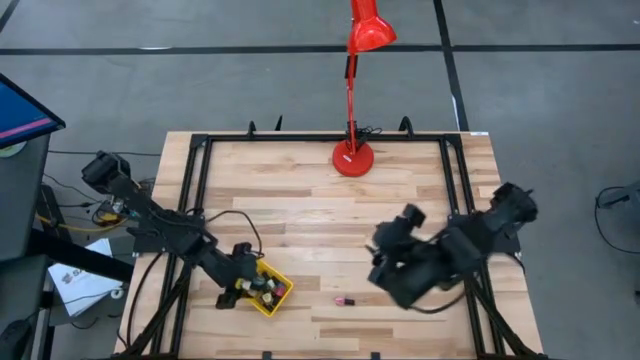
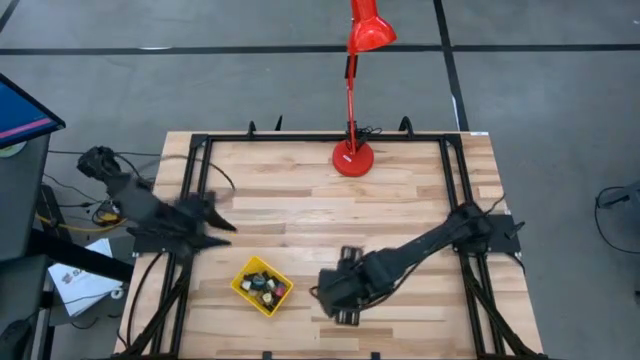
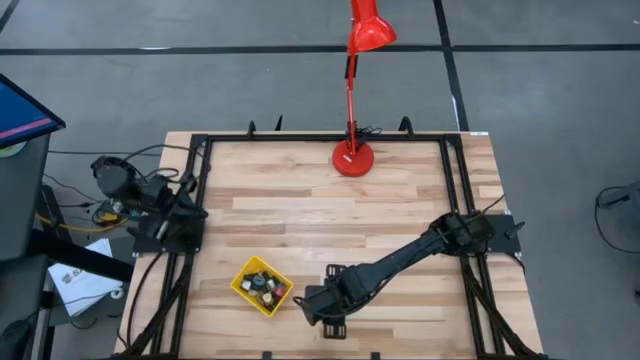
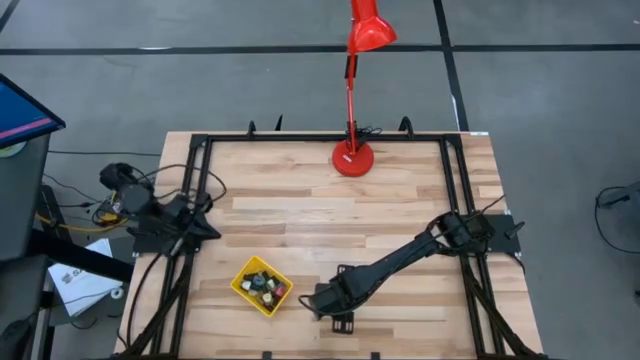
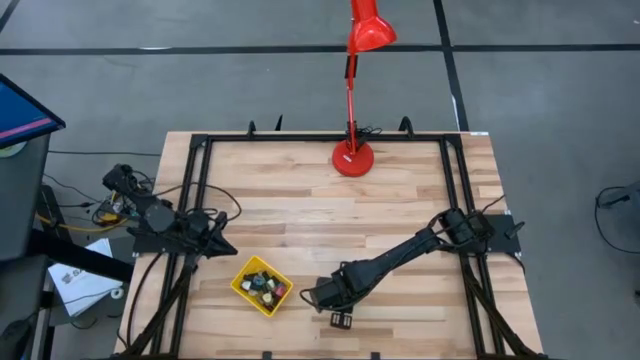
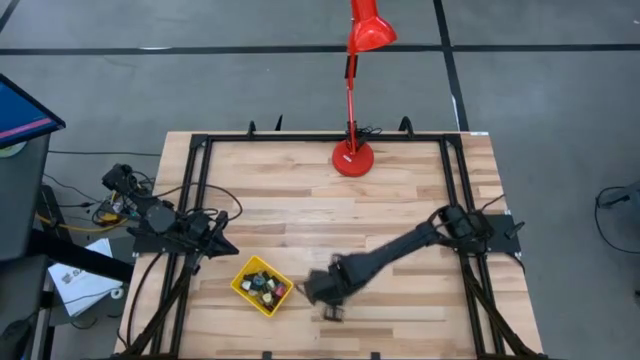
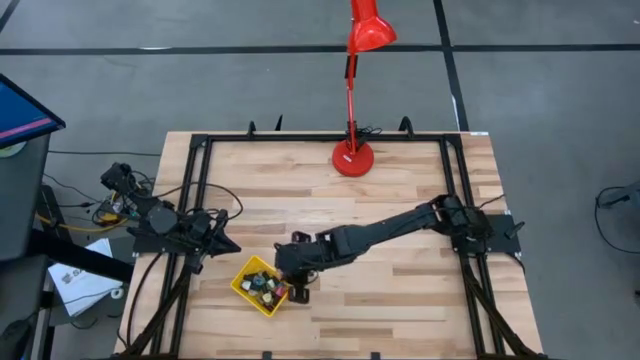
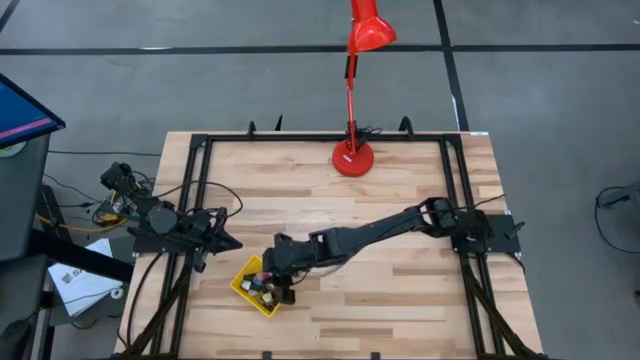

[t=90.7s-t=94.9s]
Task: Pick & Place Nail Polish
Put the pink nail polish bottle into the yellow basket

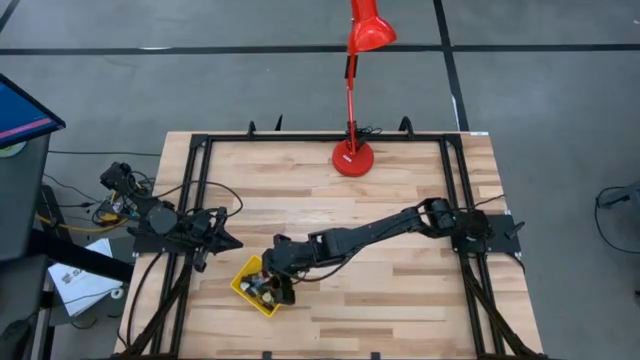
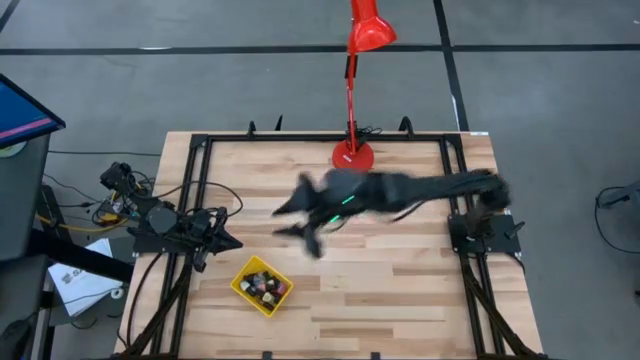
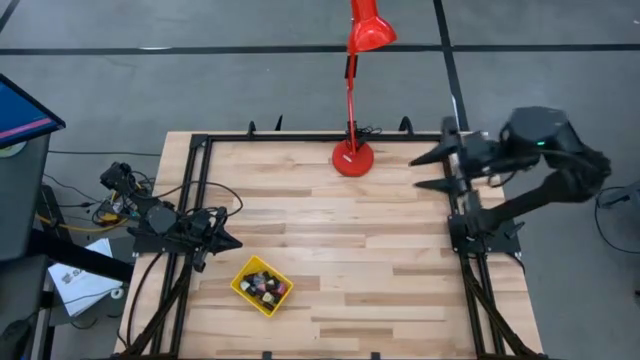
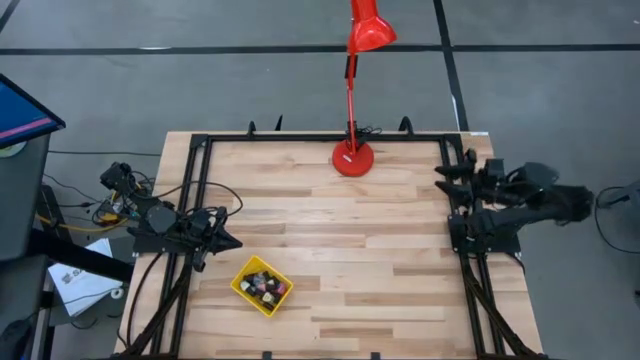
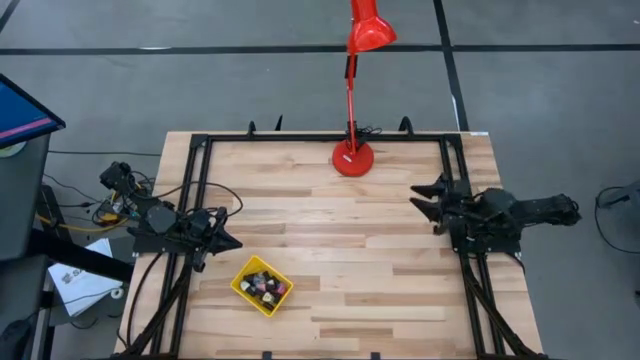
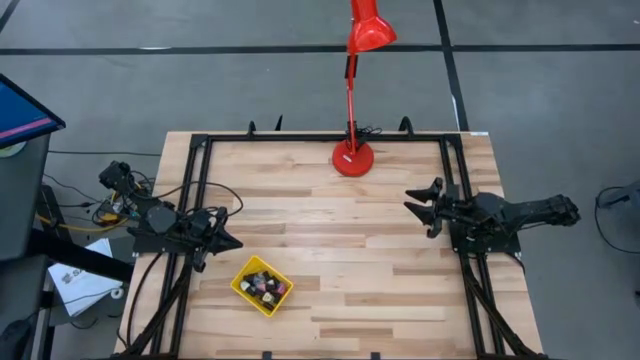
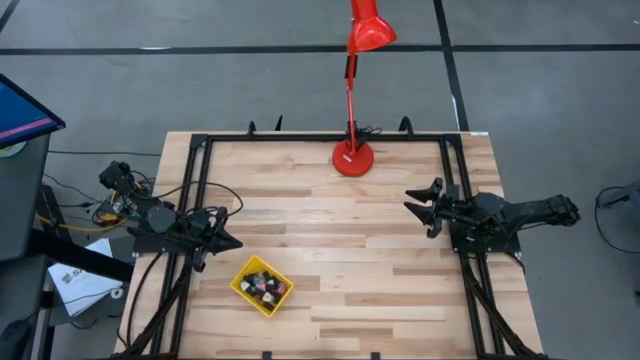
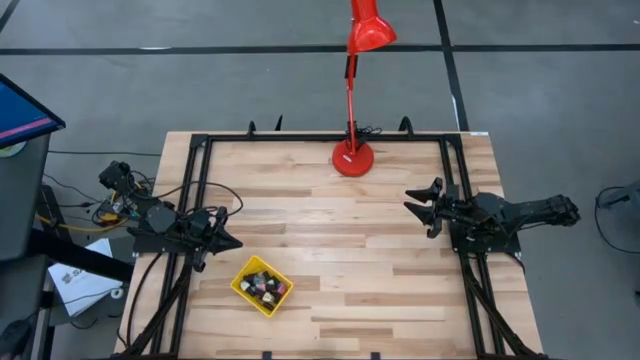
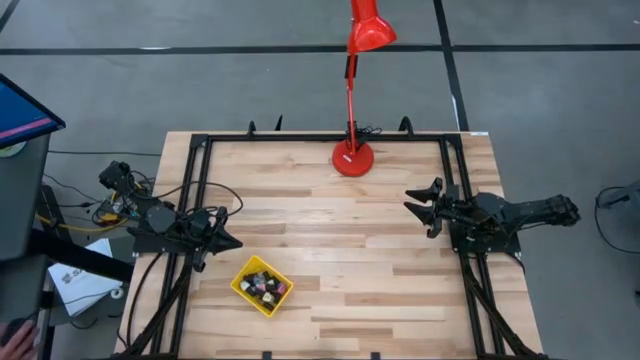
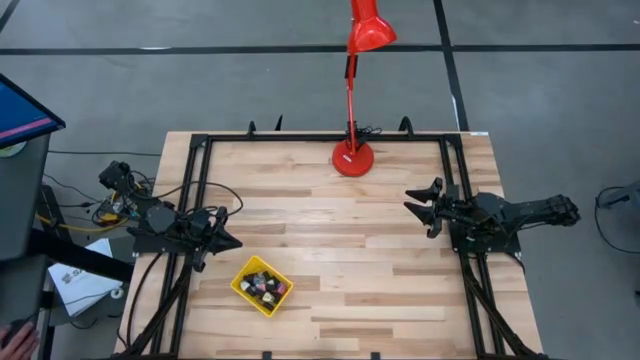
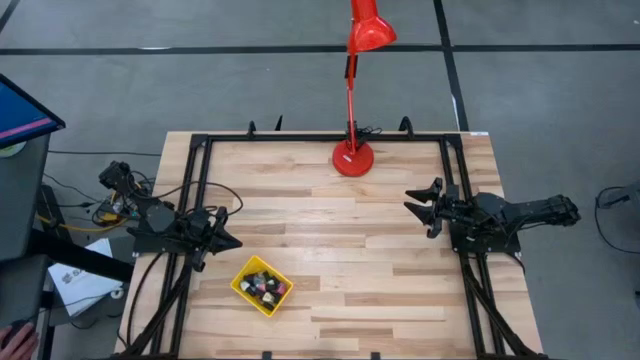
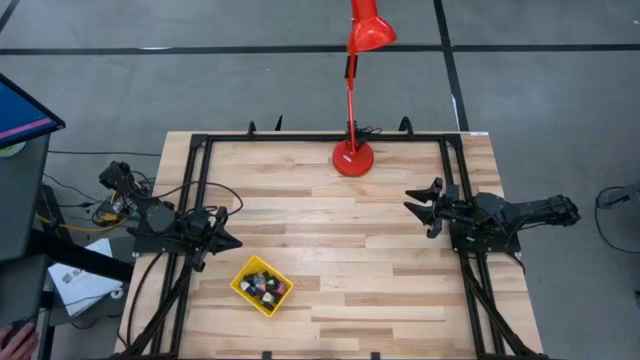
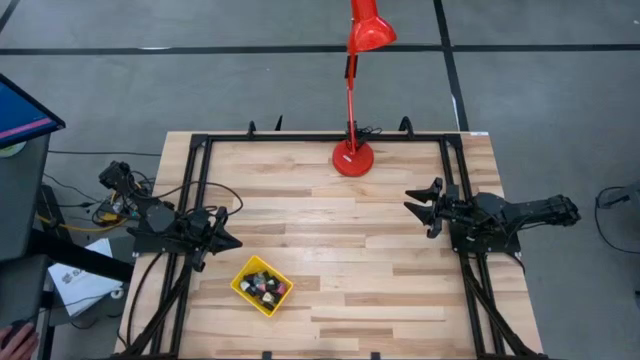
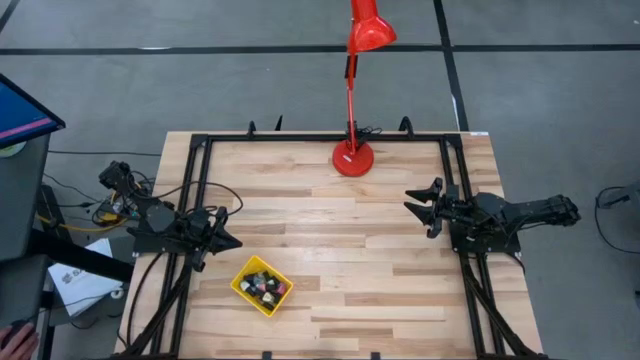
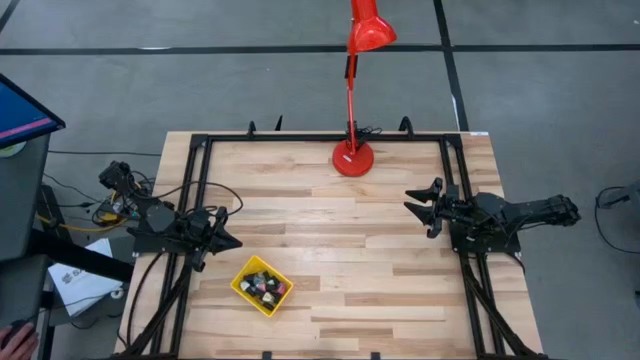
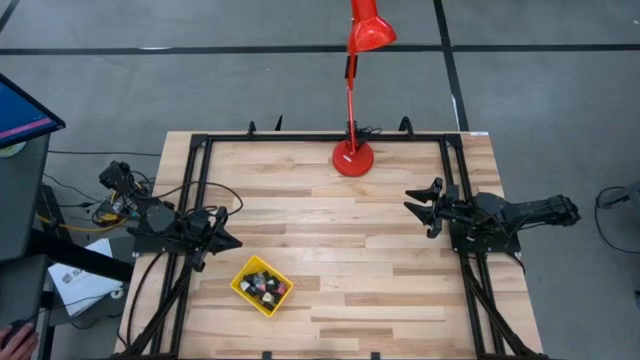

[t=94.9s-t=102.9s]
Return to Home Position

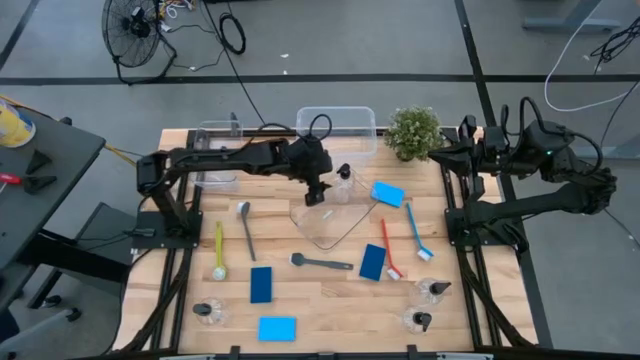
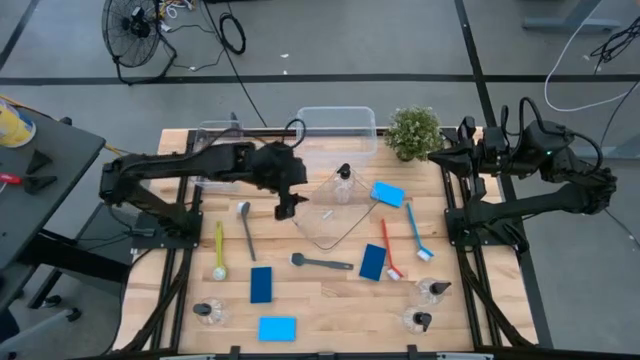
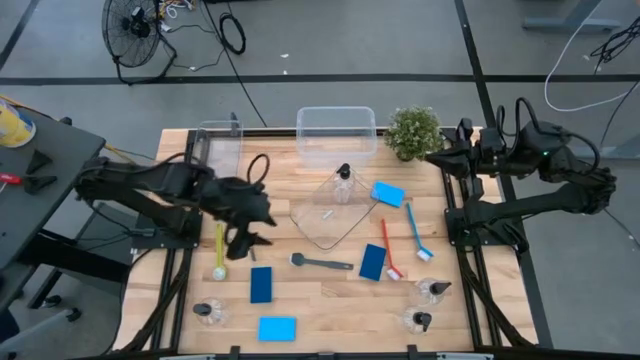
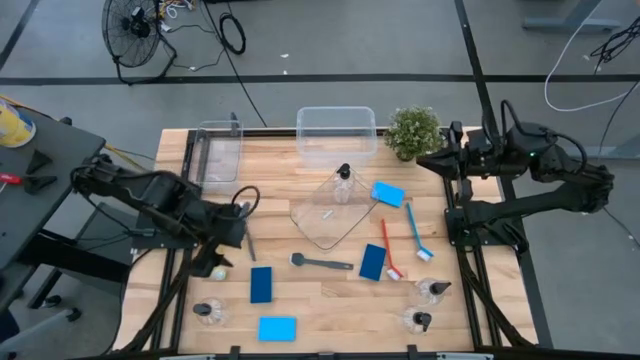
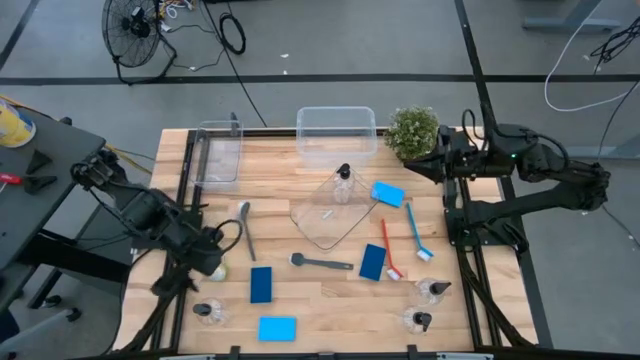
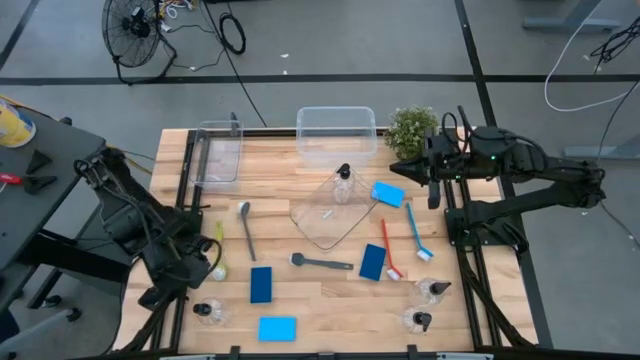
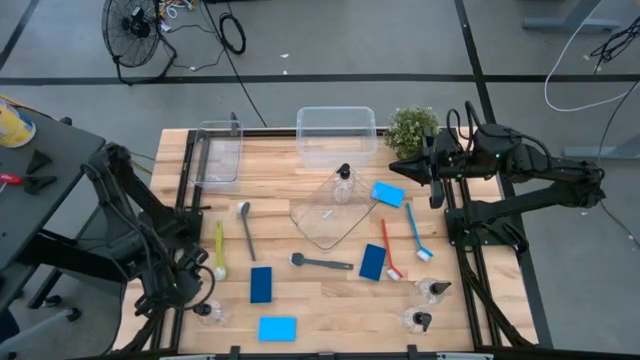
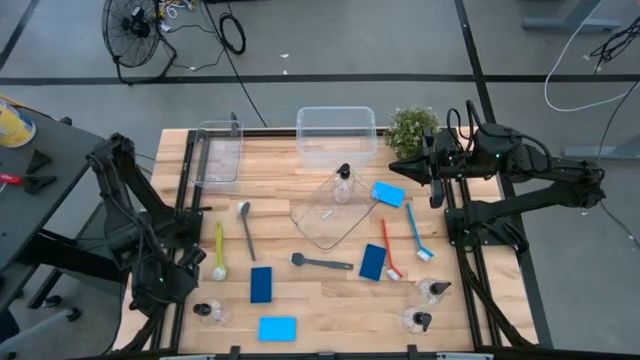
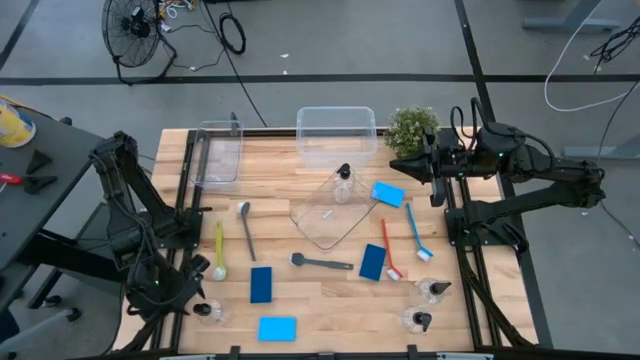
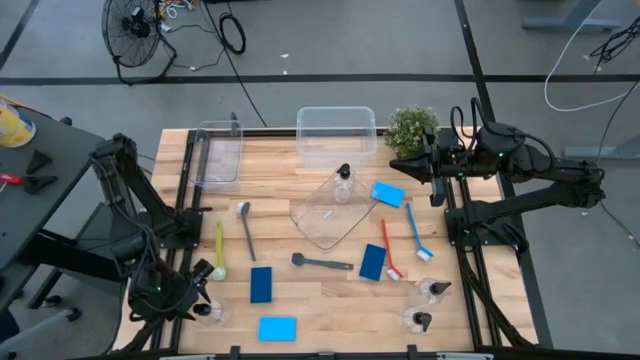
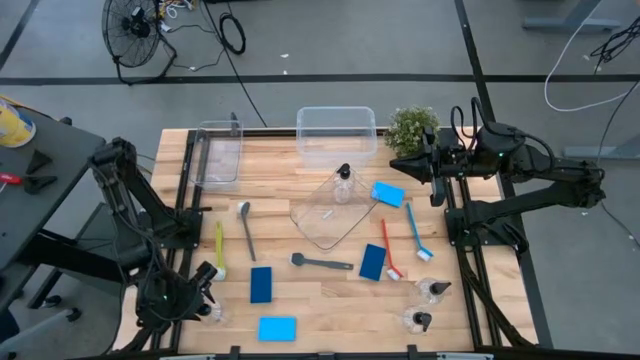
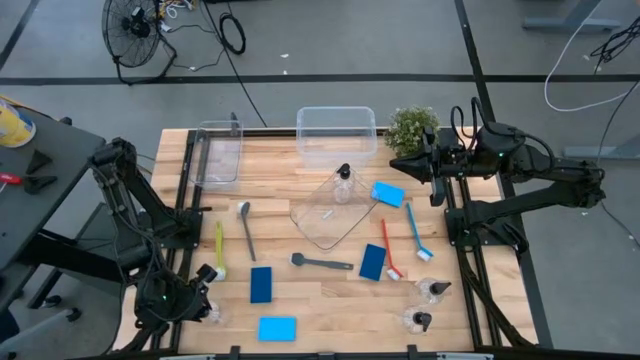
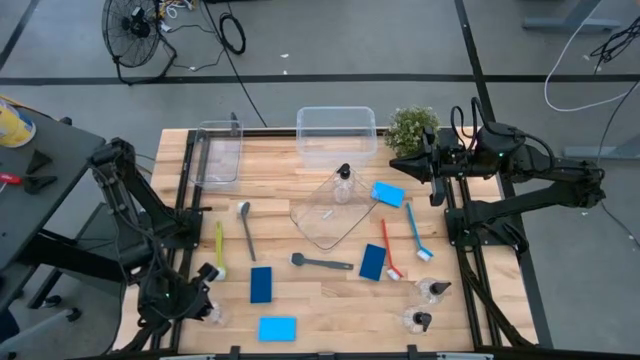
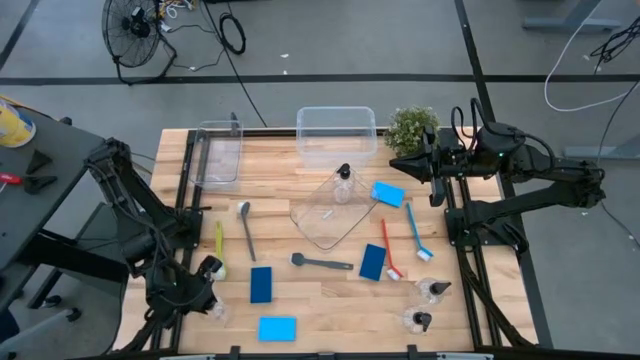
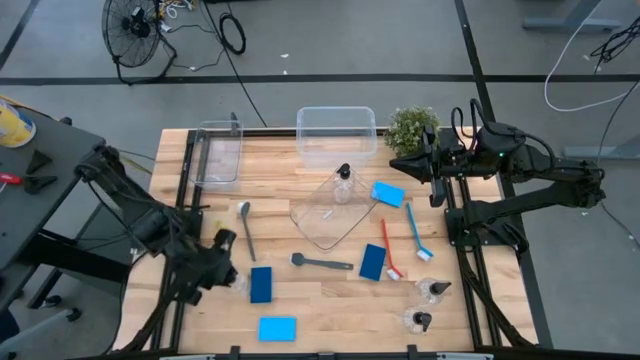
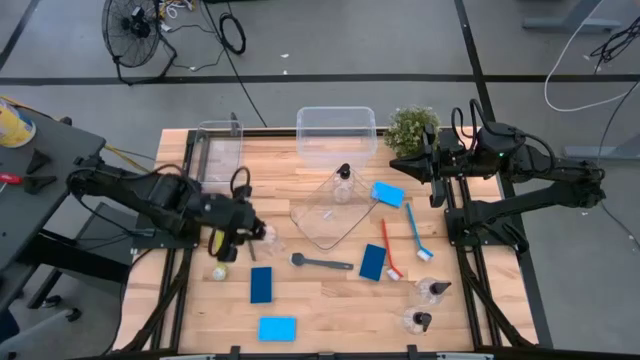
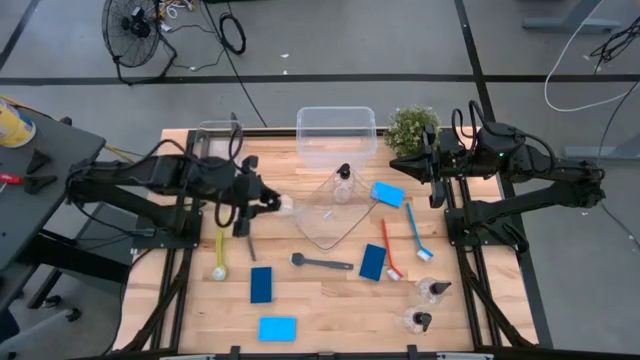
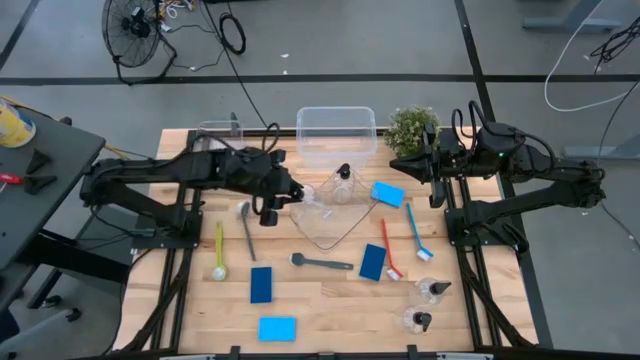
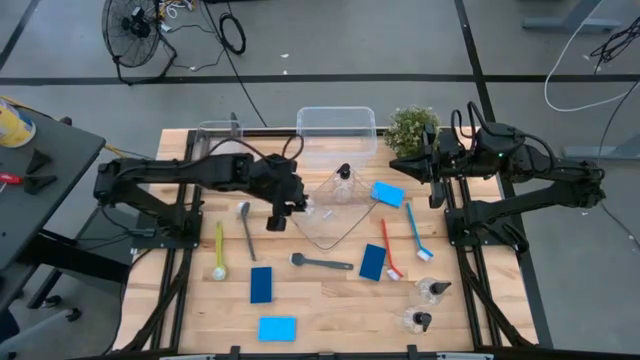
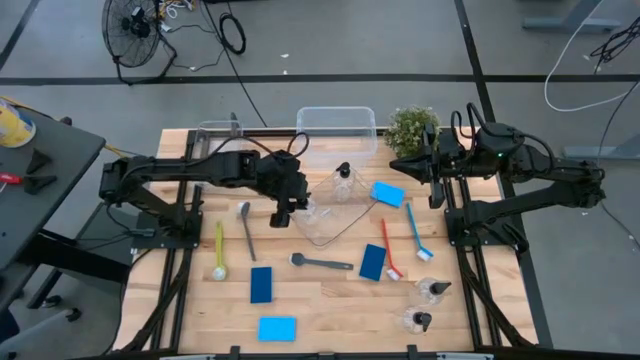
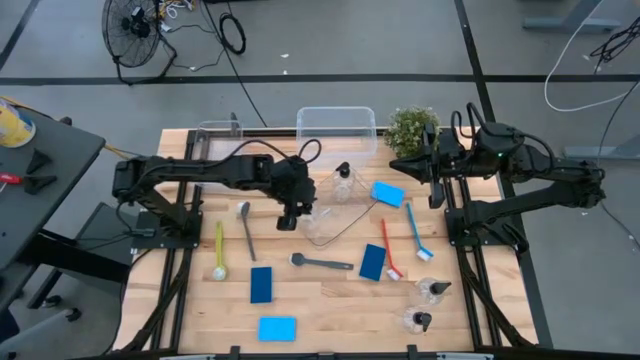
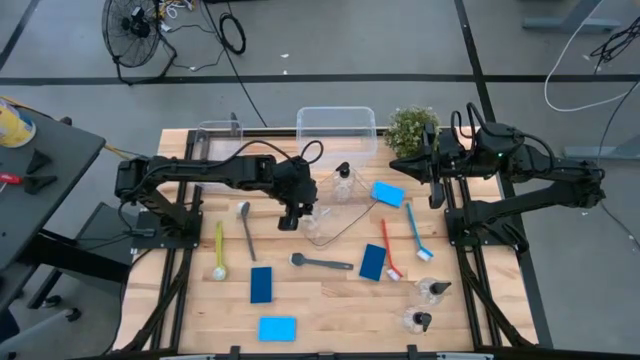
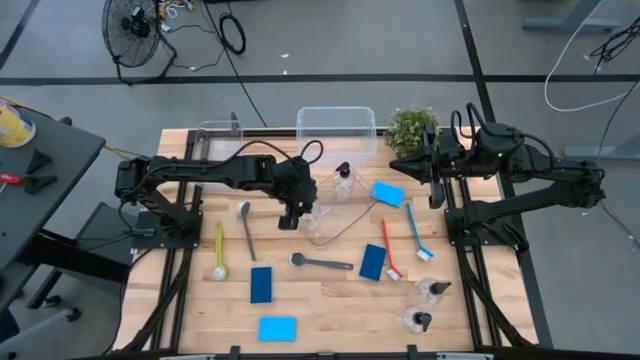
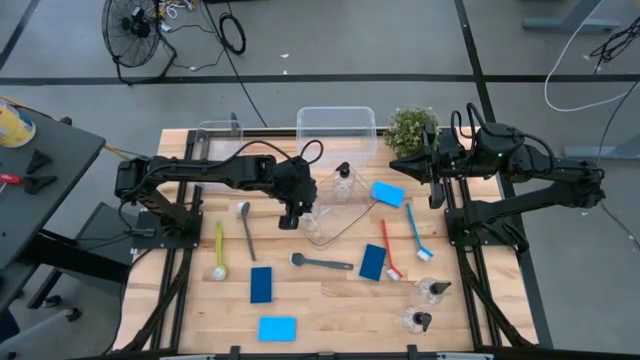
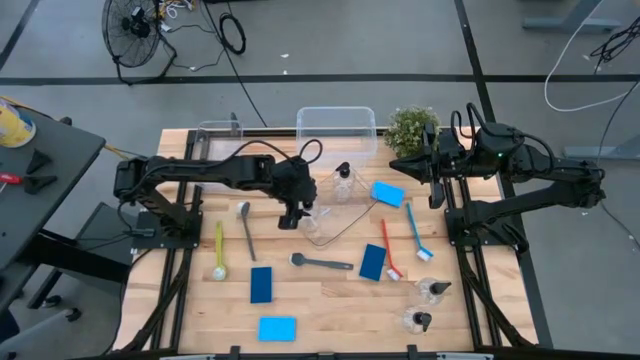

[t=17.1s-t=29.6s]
Task: Pick & Place Kitchen Sink Supplies
Put the dishwashing liquid dispenser into the right transparent bin
